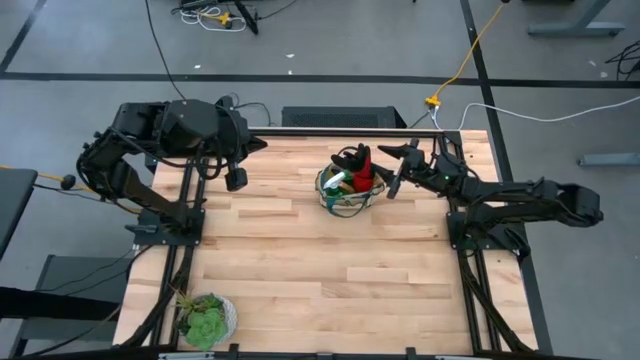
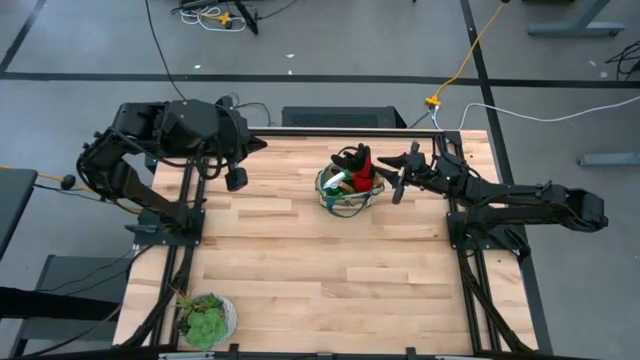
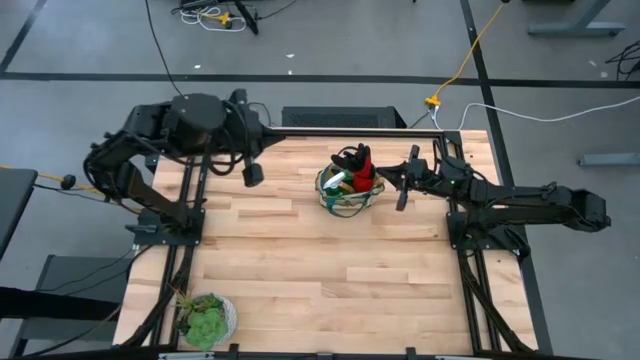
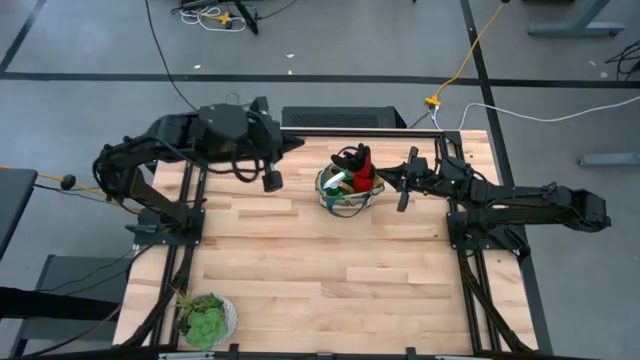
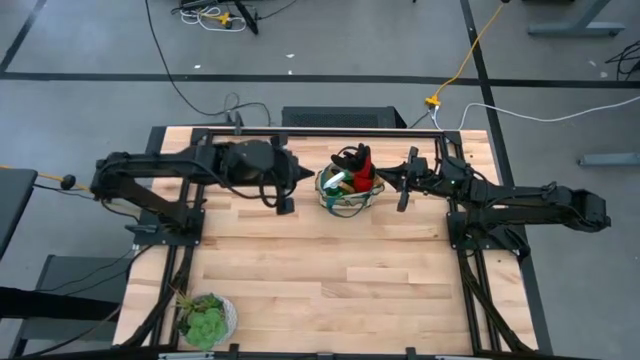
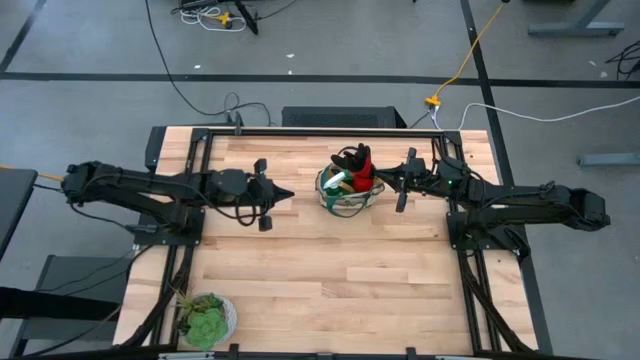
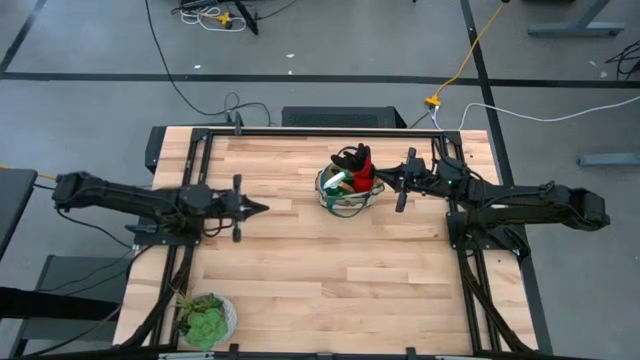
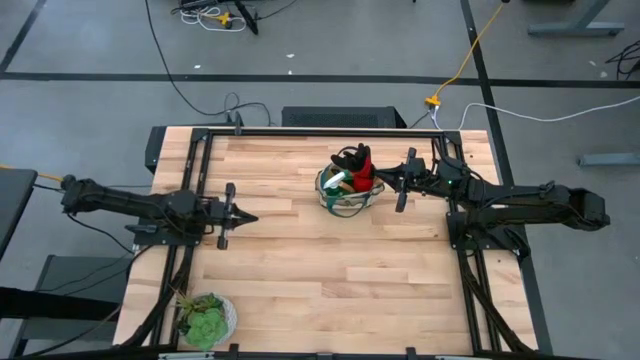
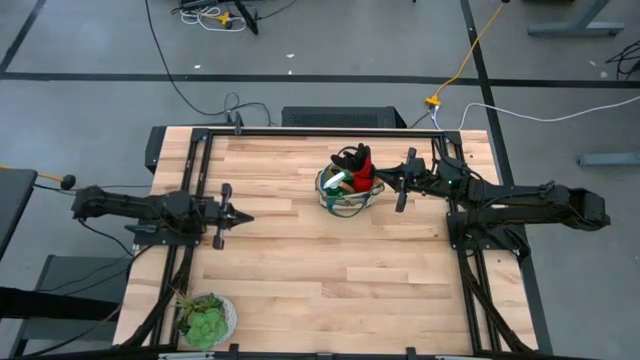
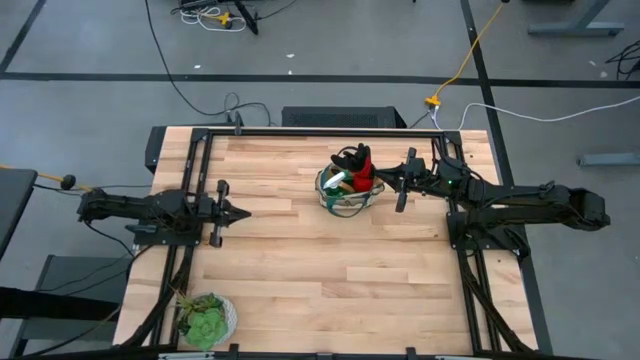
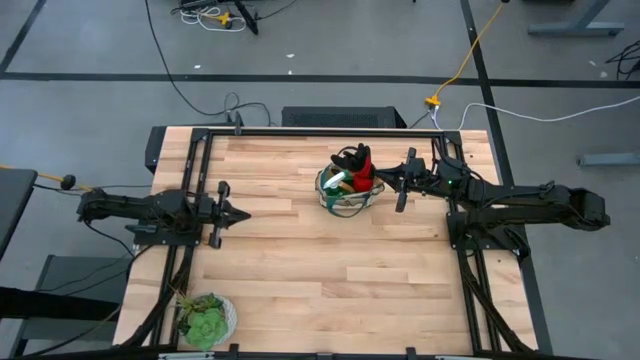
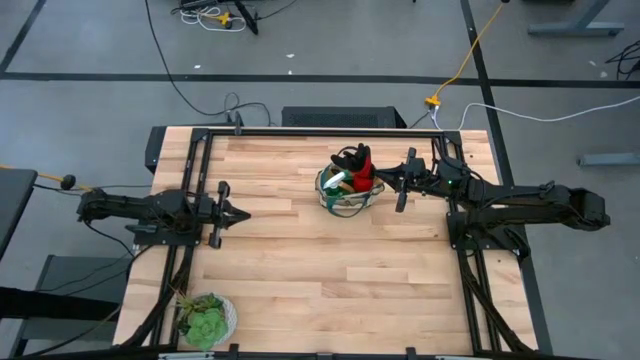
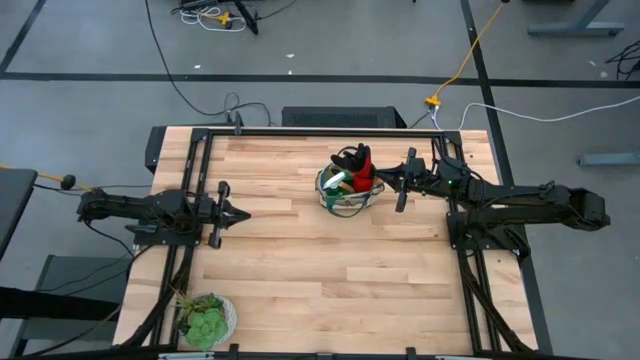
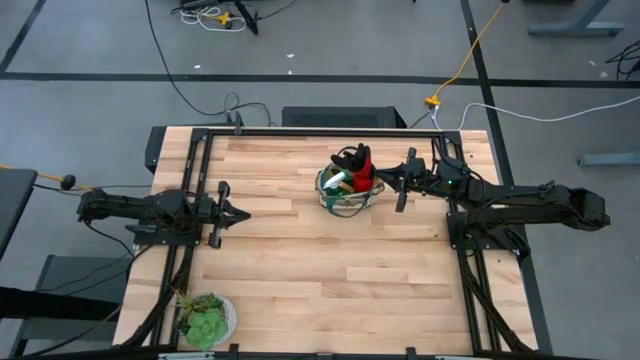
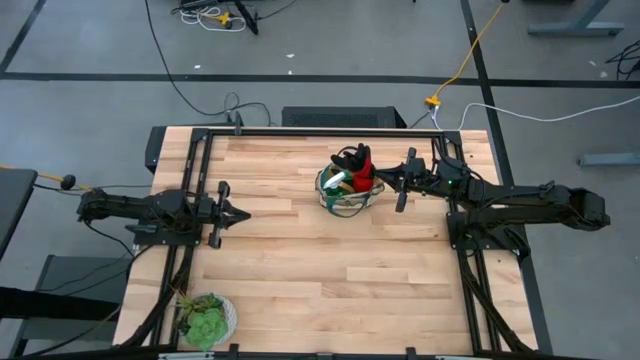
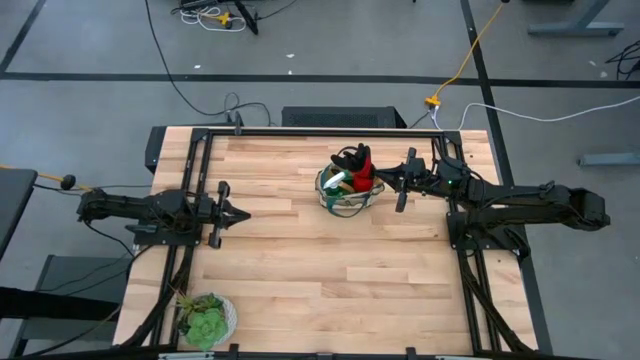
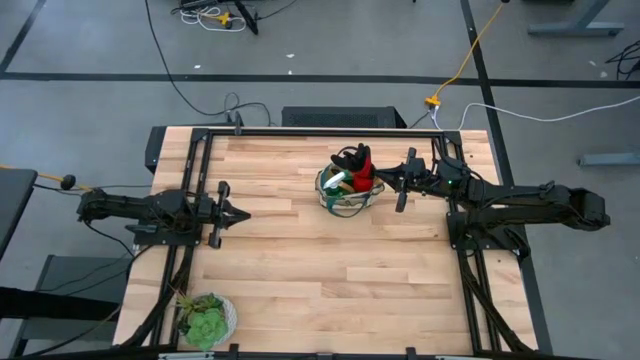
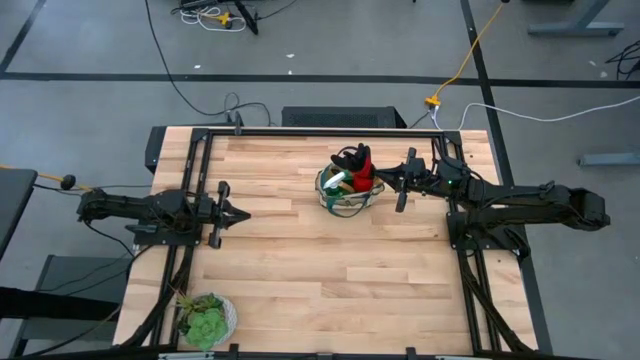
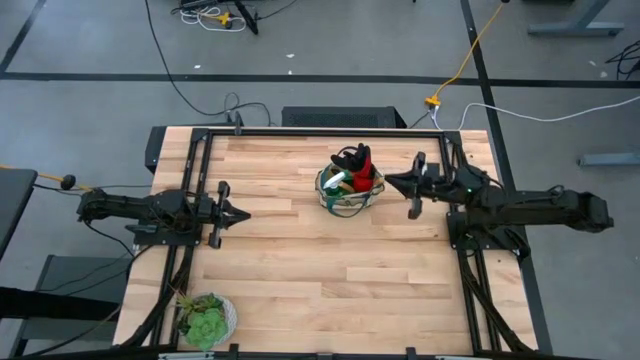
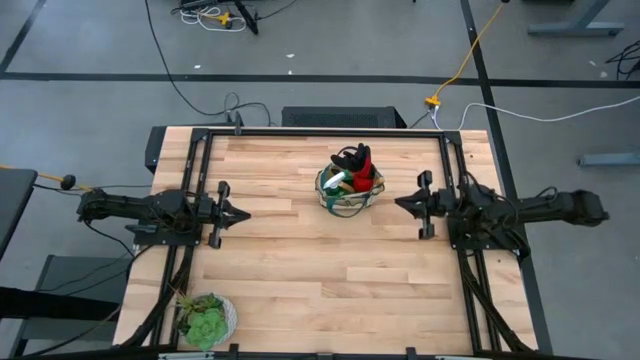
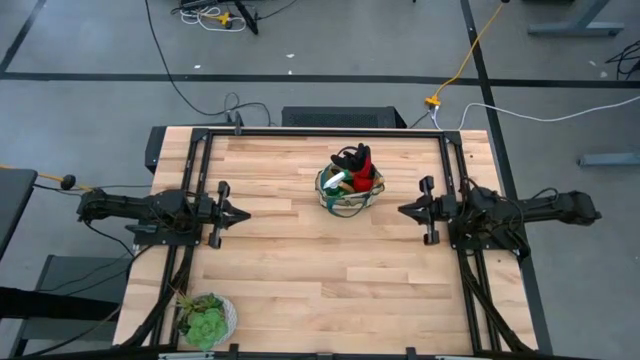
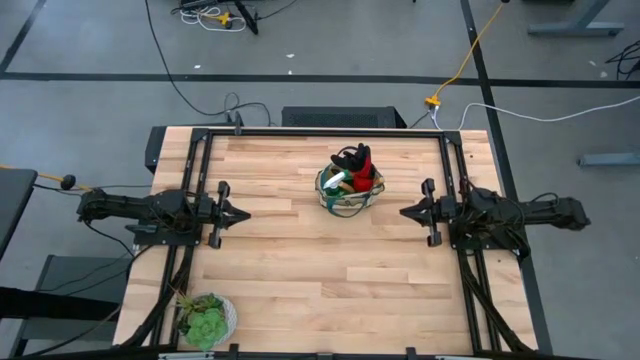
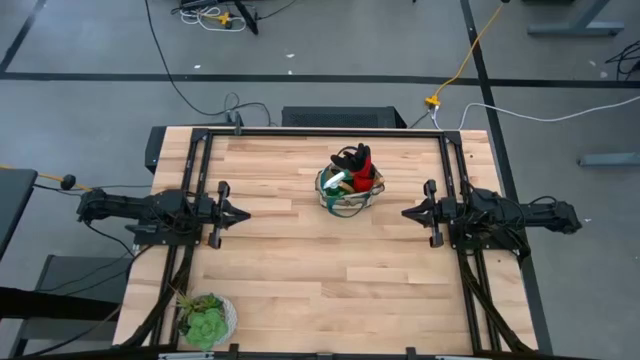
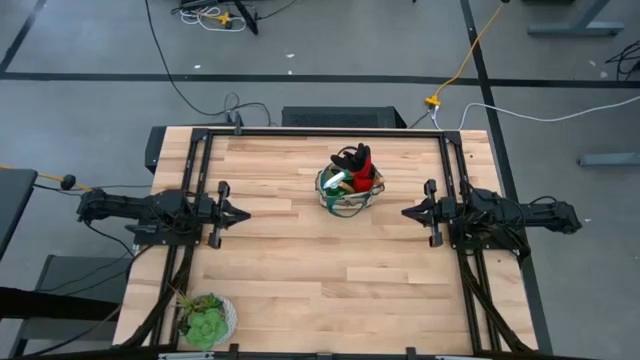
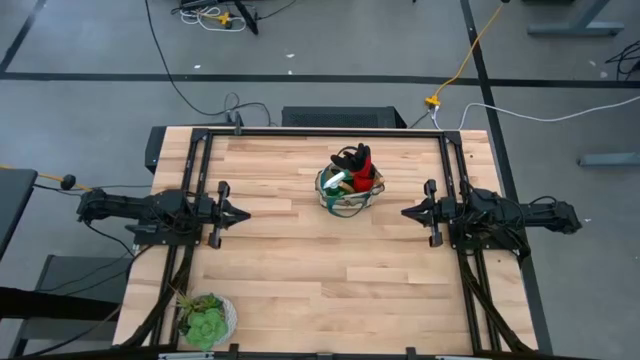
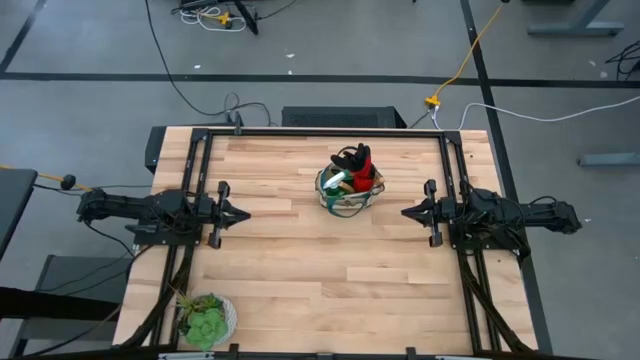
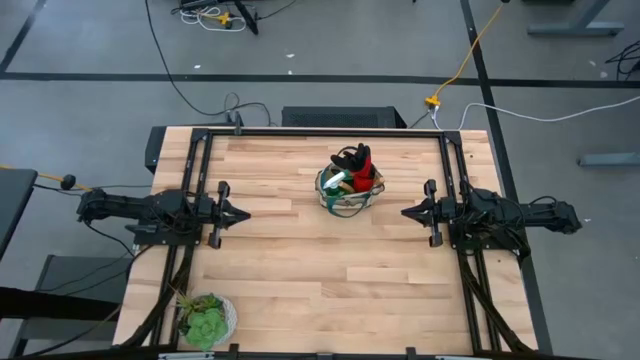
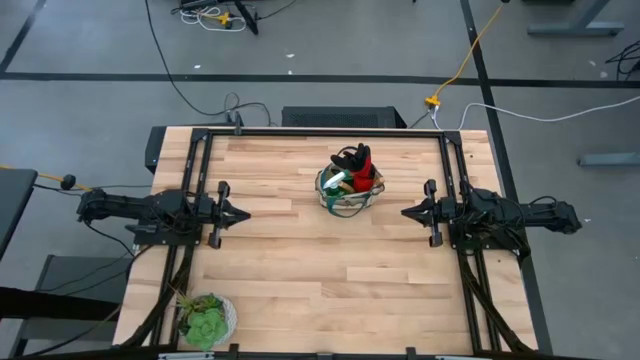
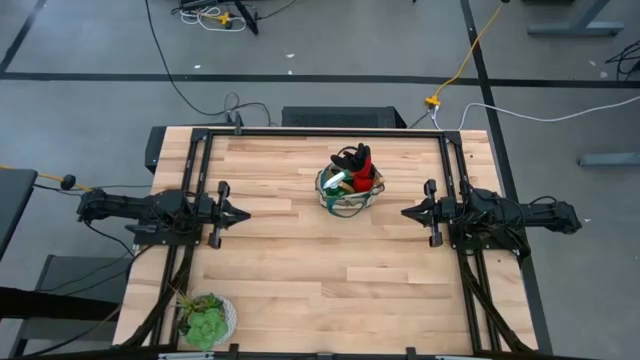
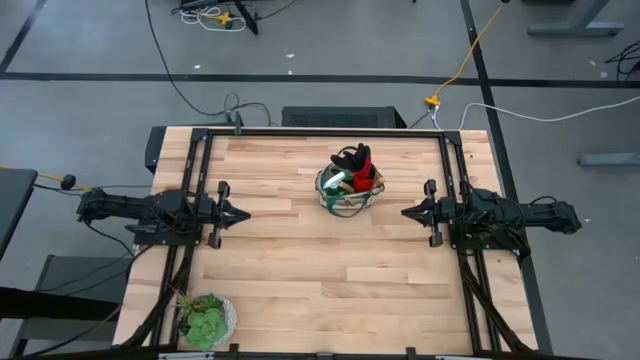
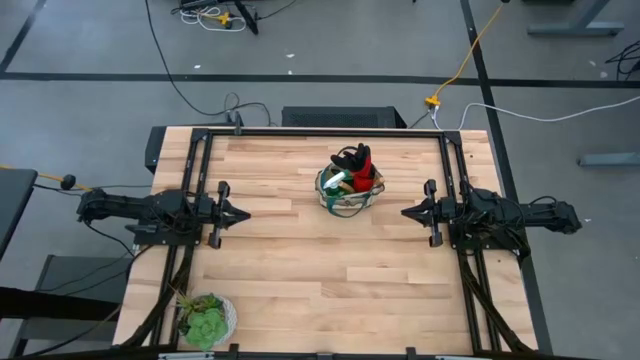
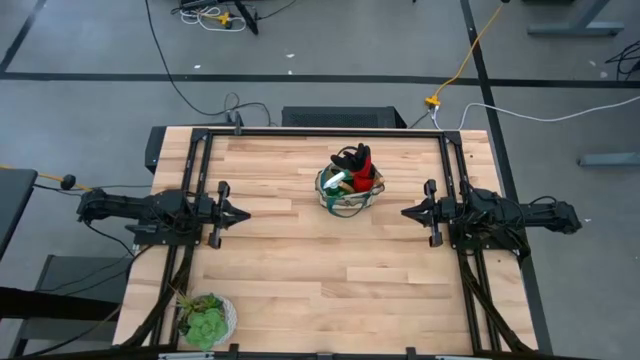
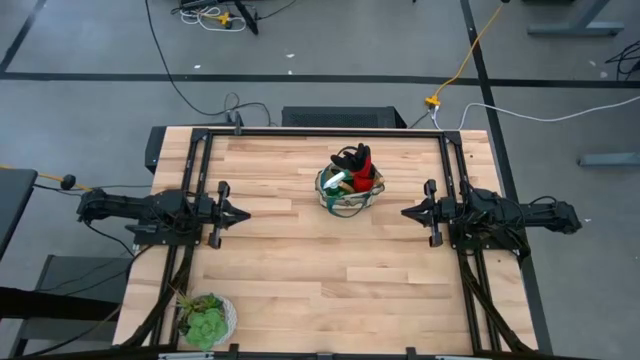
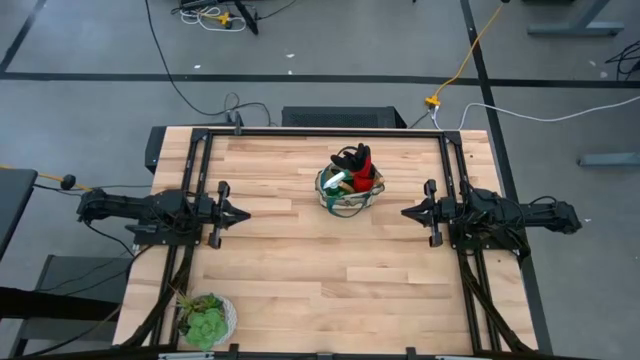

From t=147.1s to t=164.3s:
Task: Pick & Place Garden tools in Gardening bag
Return to Home Position

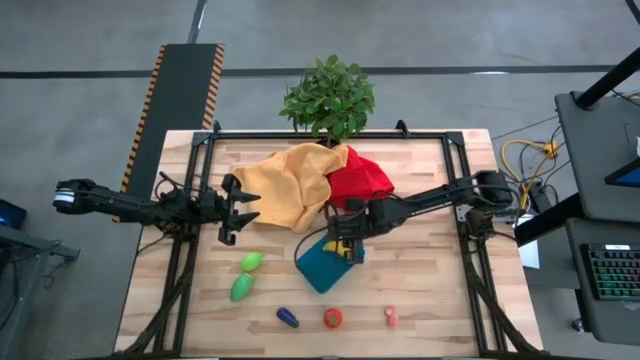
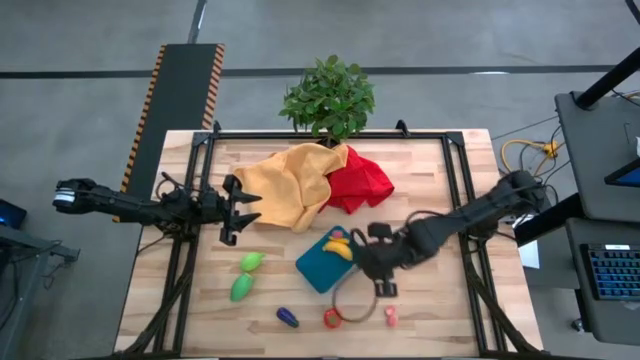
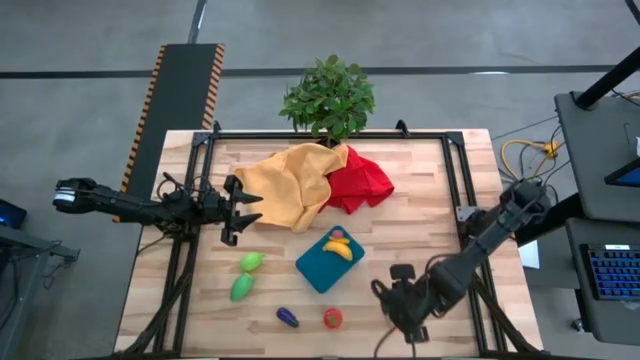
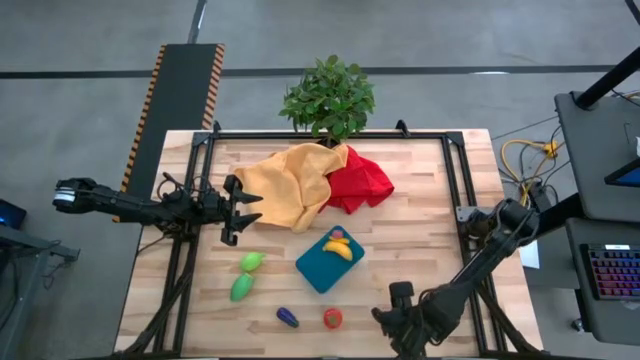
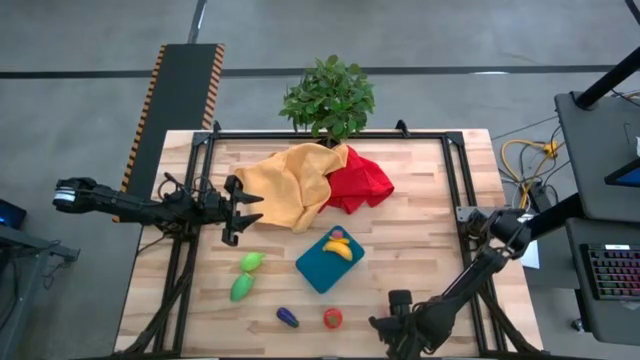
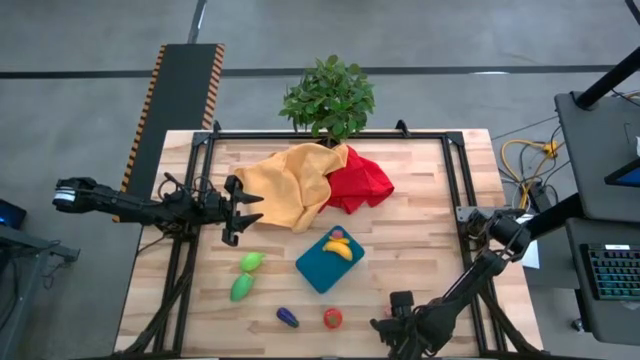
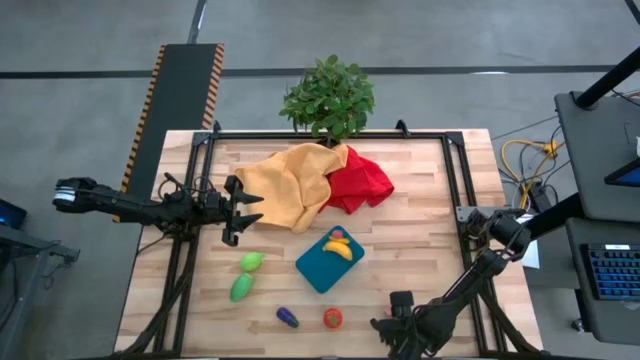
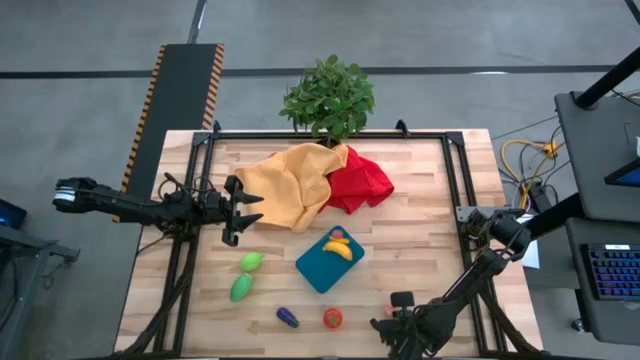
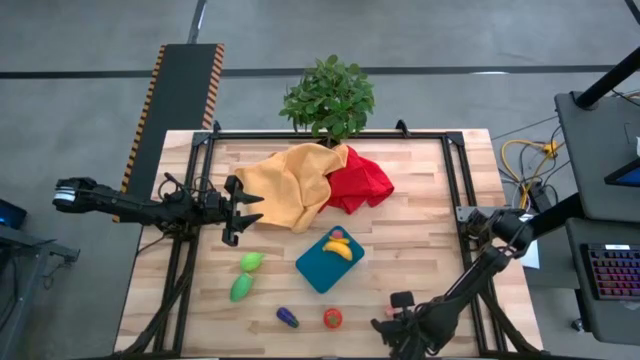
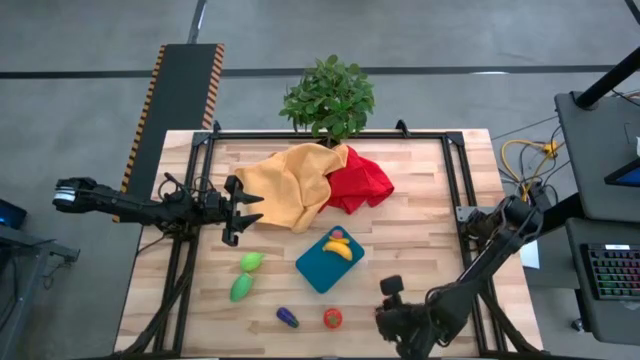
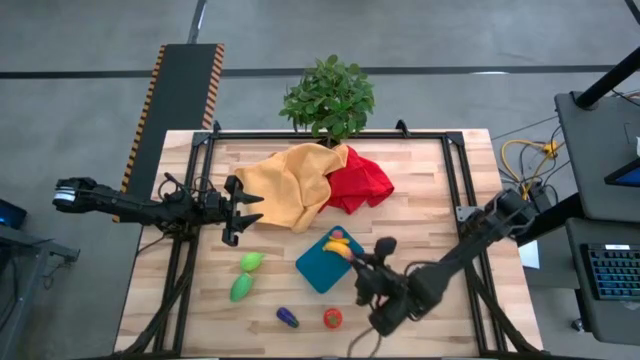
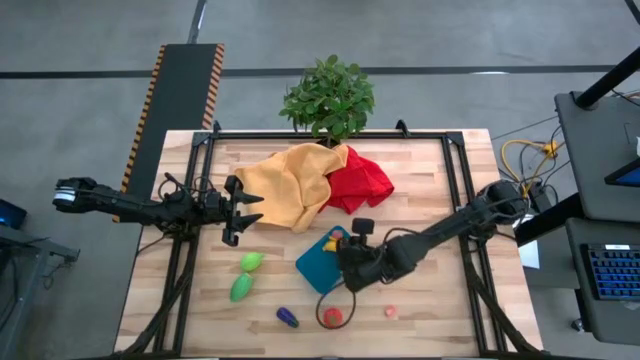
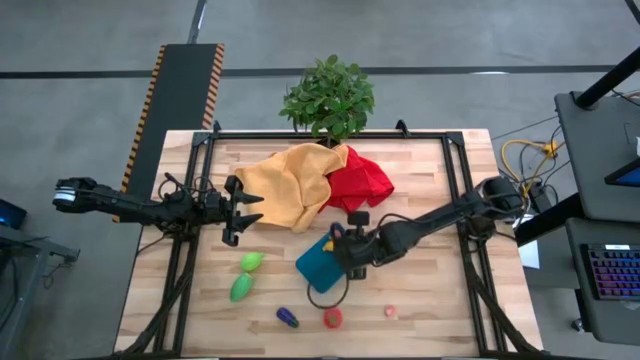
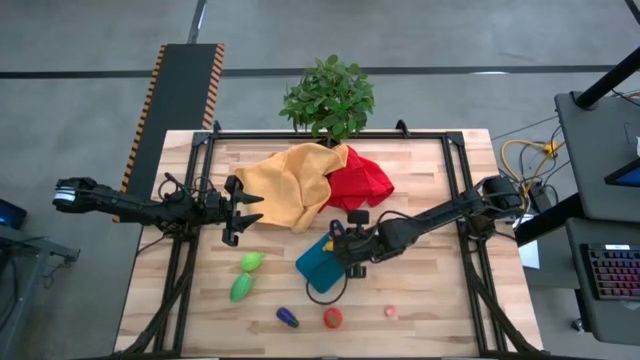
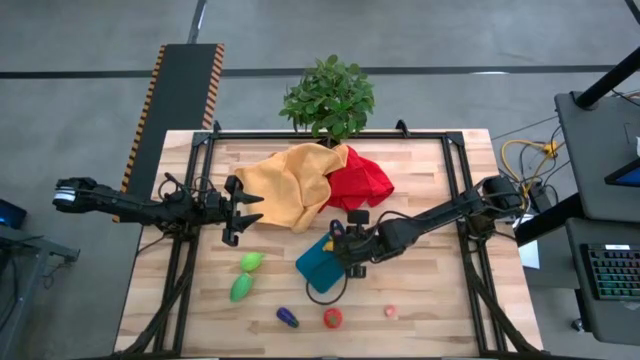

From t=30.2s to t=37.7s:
Task: Pick and placing Produce into tupperware
Put the bottom pink peach into the blue bin
